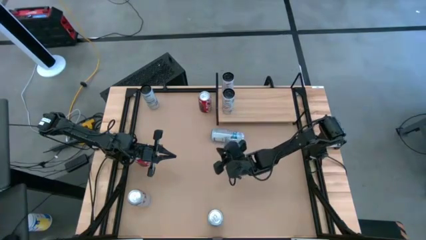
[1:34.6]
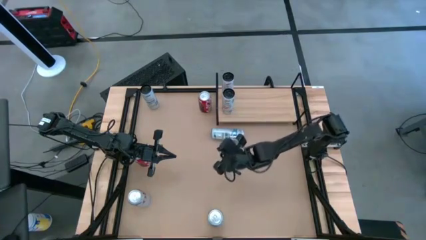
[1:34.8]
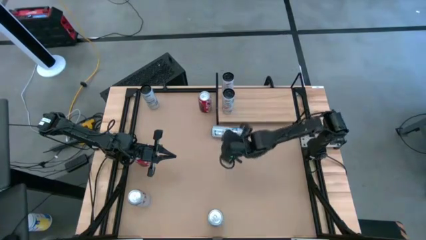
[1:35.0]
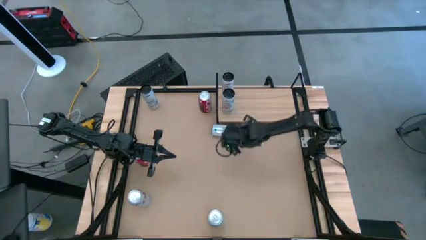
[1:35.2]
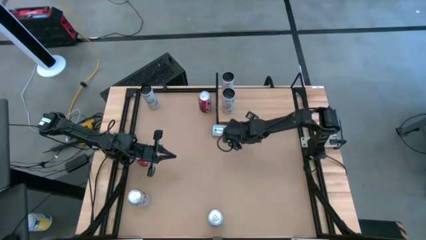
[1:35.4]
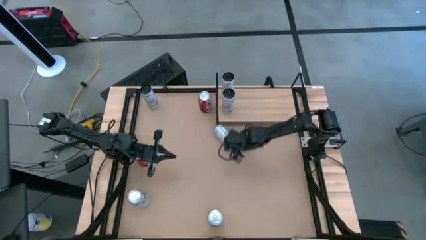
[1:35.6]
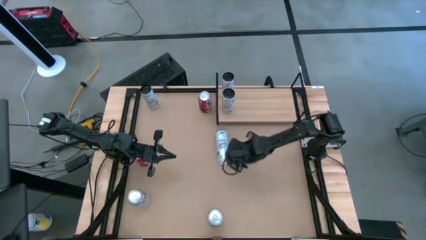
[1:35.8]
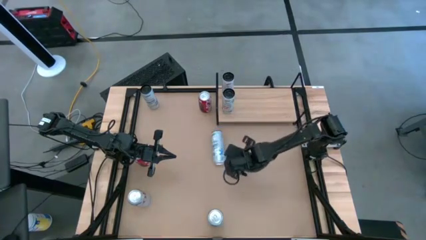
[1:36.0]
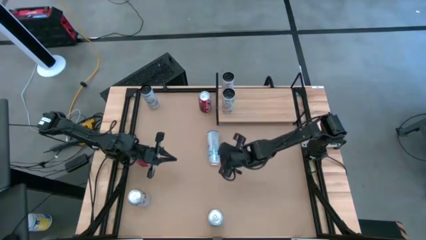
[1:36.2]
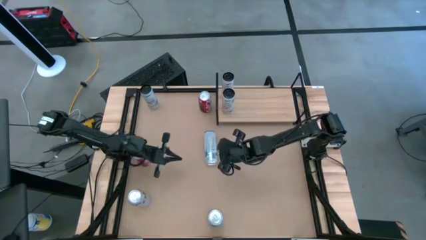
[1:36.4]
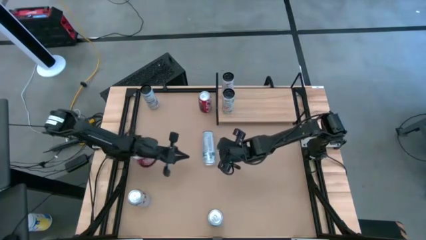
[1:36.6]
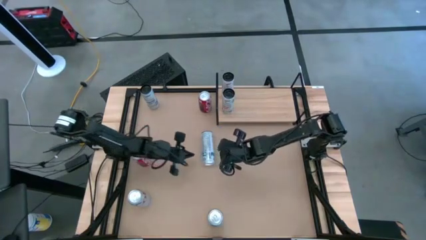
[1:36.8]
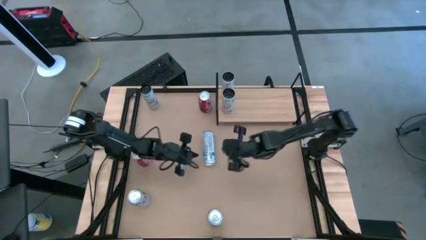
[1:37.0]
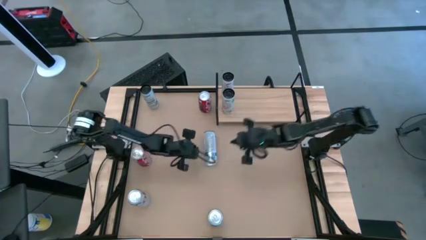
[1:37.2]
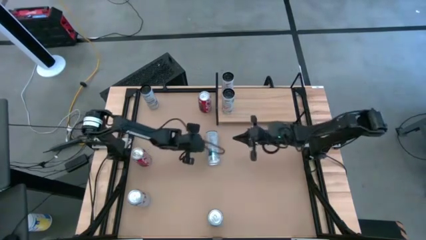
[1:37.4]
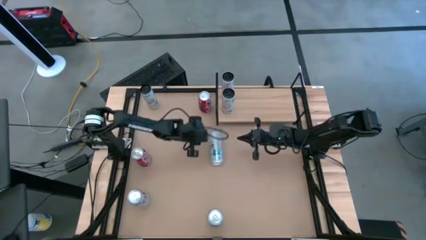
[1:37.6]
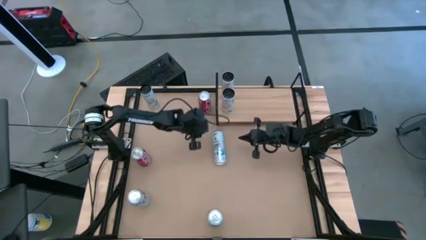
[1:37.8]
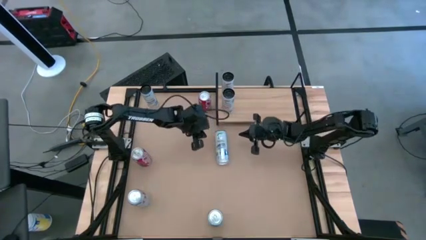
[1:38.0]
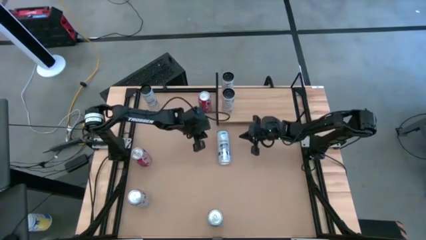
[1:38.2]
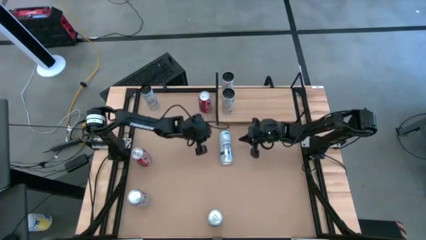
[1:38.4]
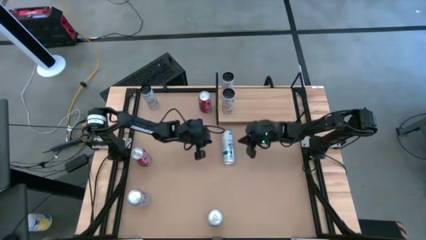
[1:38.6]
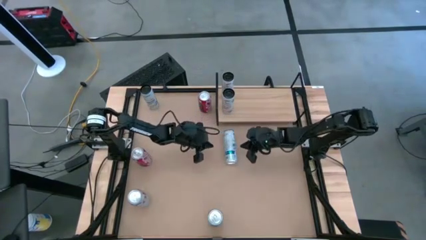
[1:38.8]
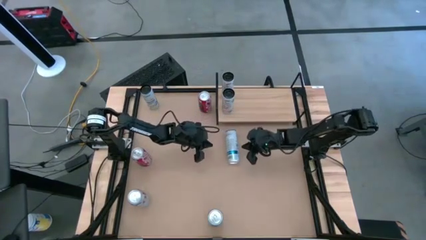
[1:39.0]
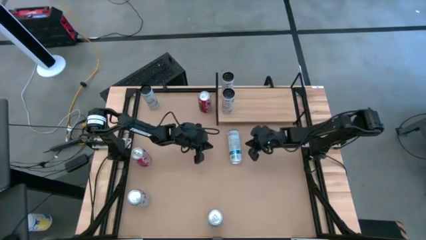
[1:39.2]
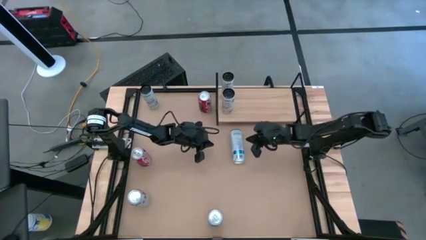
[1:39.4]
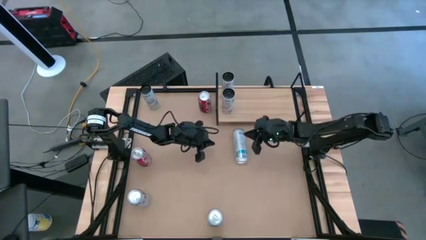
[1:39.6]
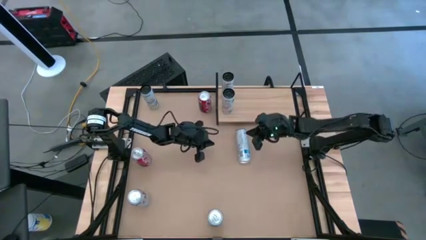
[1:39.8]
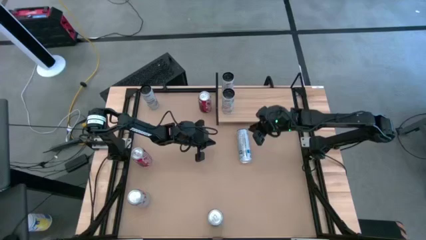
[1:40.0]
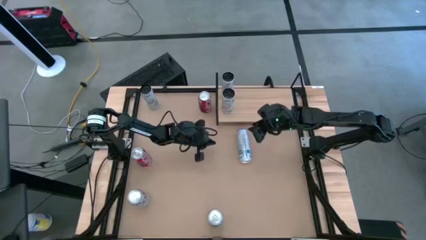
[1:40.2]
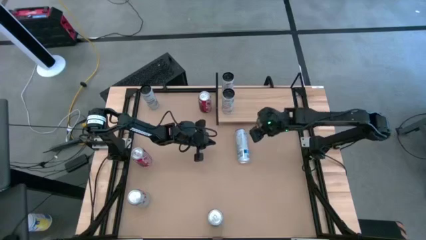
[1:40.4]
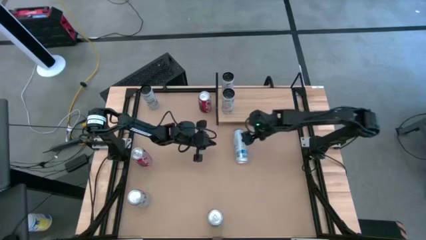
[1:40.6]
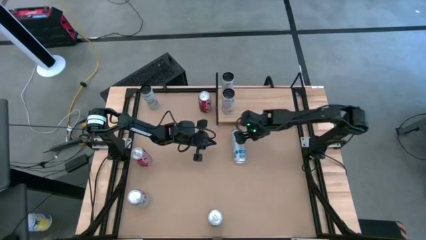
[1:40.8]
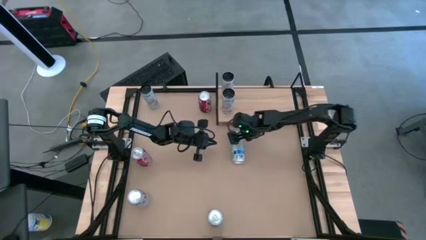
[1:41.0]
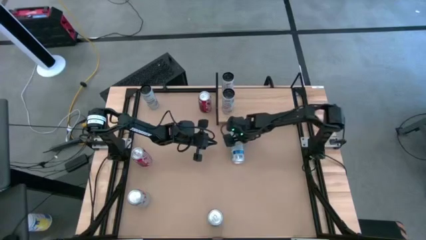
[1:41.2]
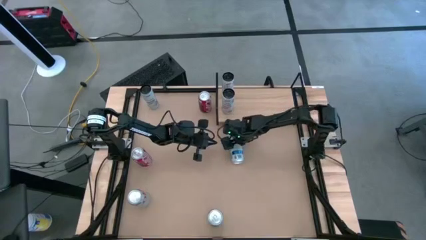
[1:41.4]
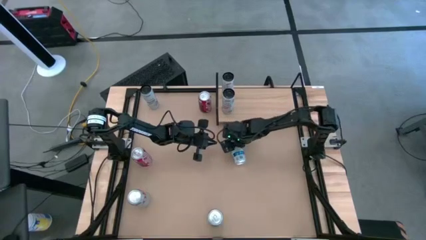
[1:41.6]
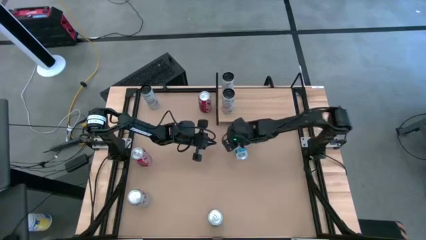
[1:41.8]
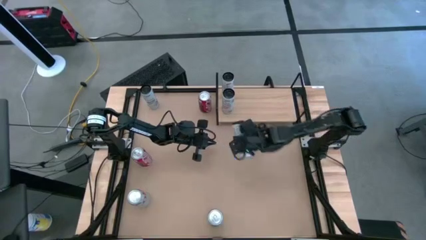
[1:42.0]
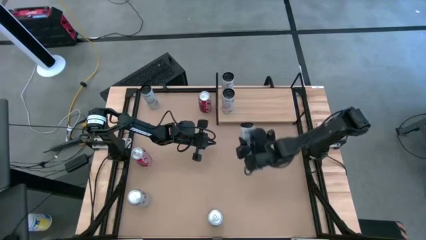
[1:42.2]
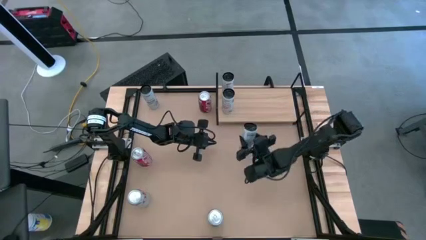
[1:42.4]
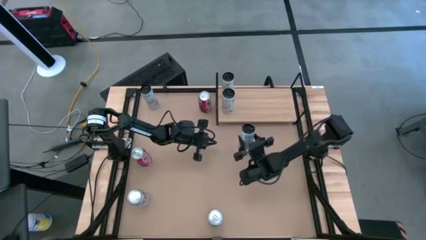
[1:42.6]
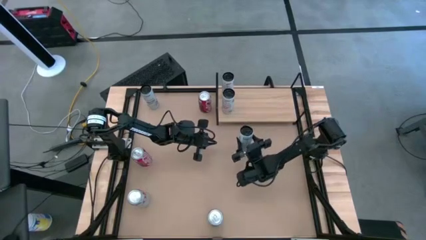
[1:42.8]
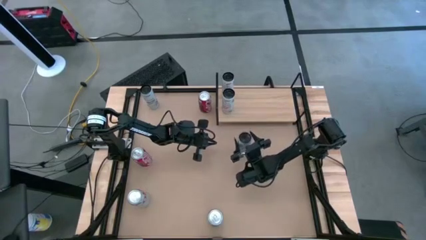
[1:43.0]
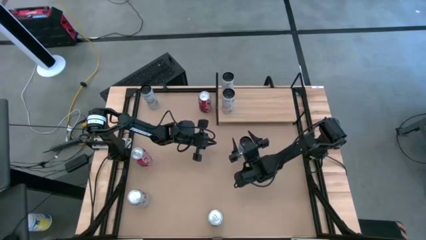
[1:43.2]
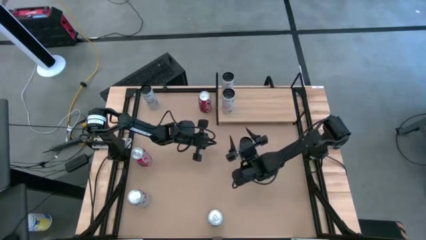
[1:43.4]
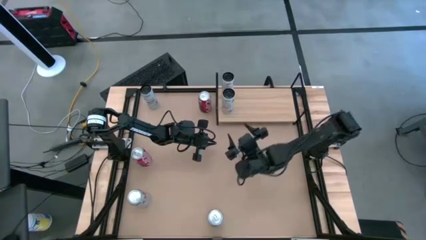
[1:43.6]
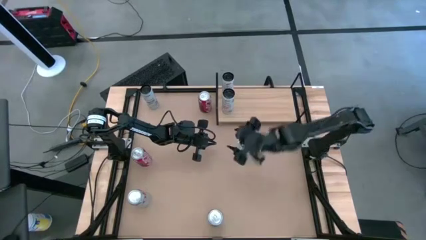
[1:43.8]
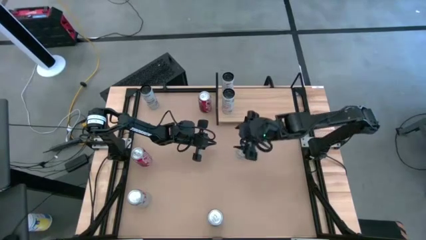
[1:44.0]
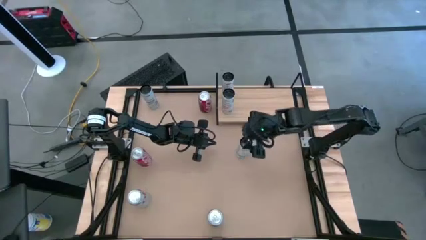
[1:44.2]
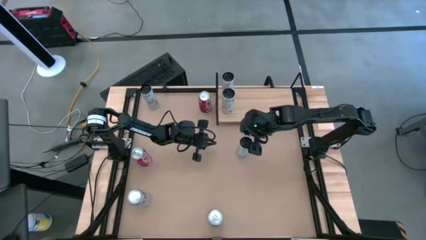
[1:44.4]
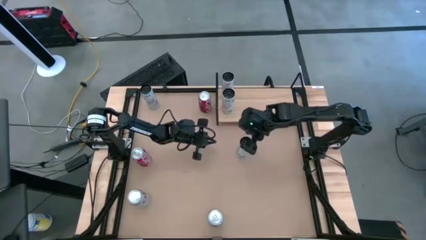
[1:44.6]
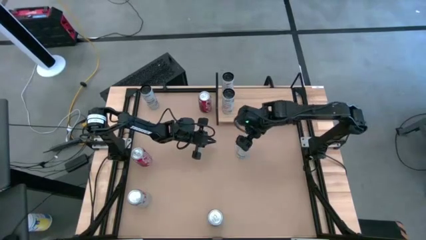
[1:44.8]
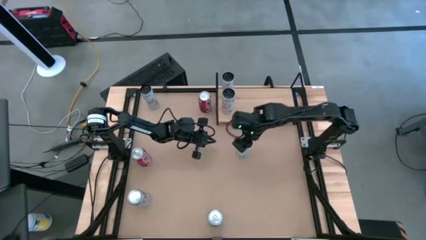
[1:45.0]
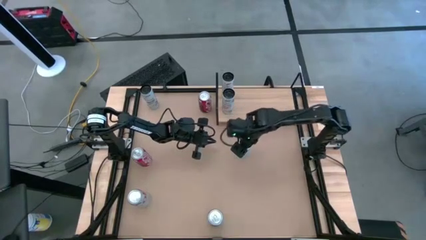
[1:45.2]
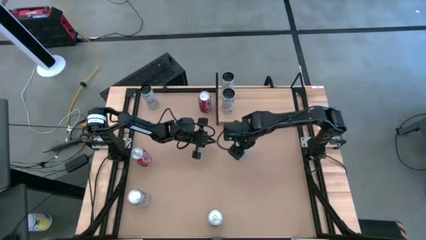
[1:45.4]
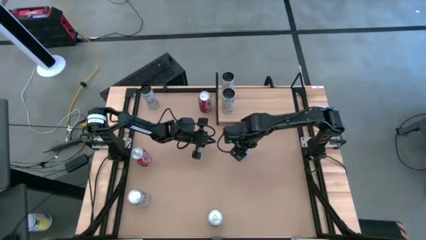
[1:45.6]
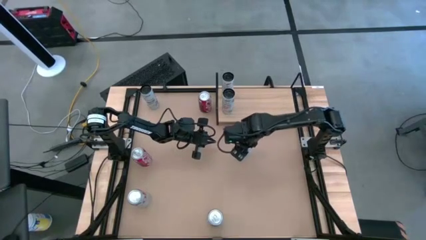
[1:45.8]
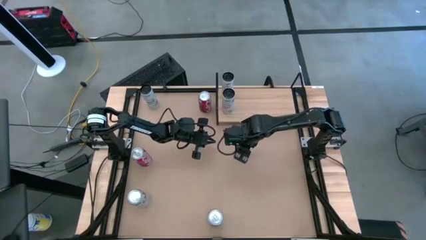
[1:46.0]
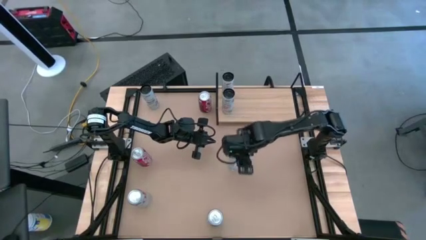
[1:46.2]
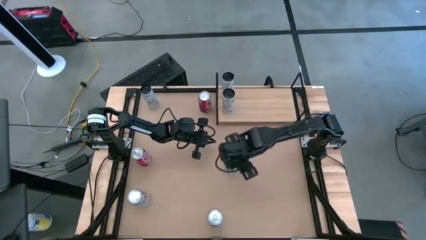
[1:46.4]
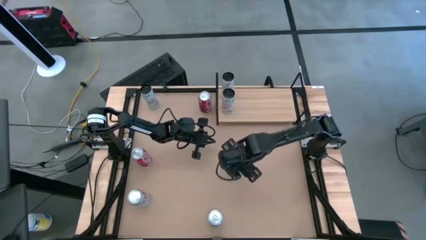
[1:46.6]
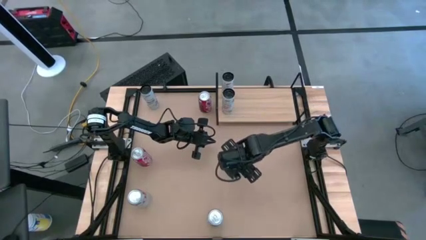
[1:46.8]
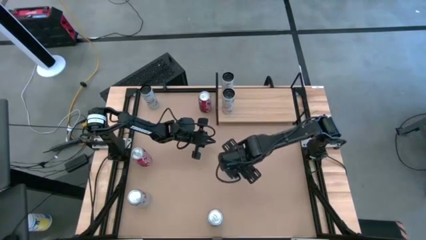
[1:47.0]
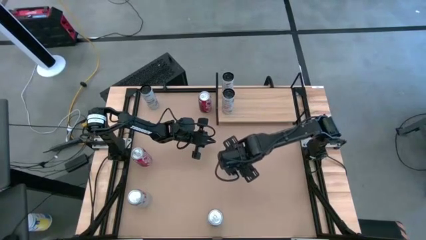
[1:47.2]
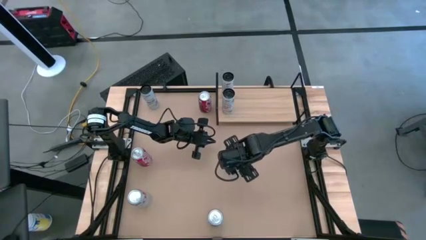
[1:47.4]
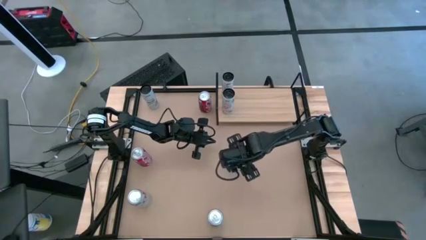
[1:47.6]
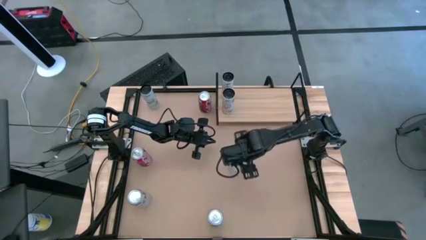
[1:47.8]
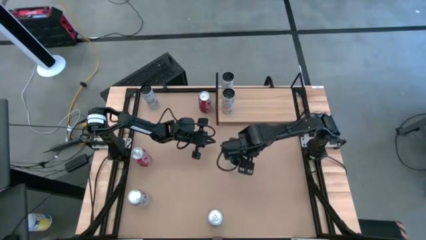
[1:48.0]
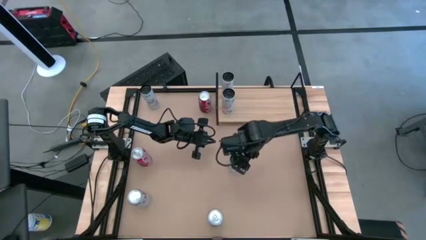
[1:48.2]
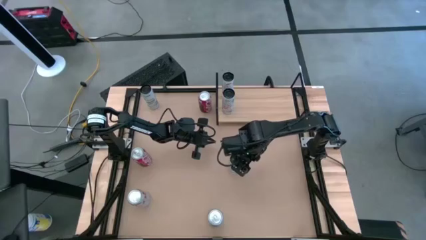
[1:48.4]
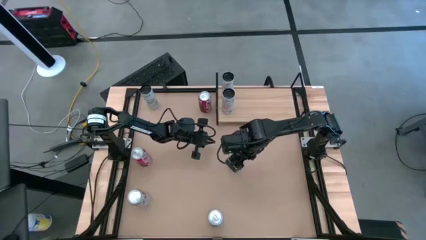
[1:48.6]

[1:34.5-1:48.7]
Task: Place canned beverage on shelf
Put the bottom white-blue soda can on the shelf

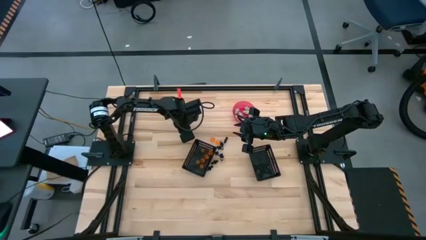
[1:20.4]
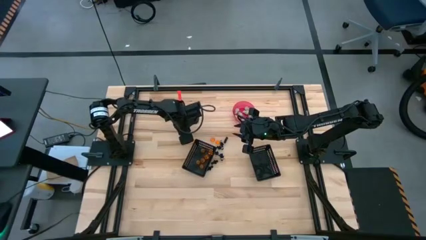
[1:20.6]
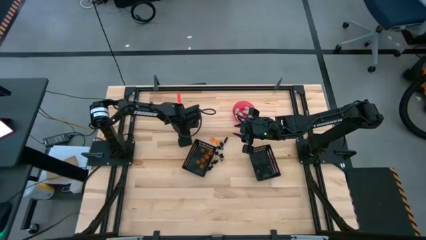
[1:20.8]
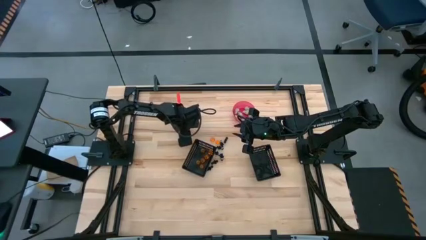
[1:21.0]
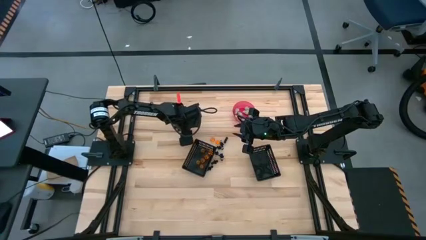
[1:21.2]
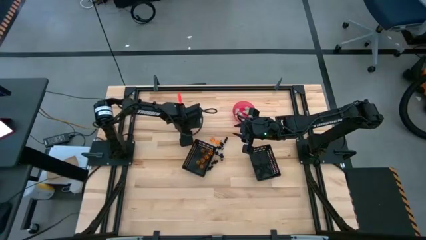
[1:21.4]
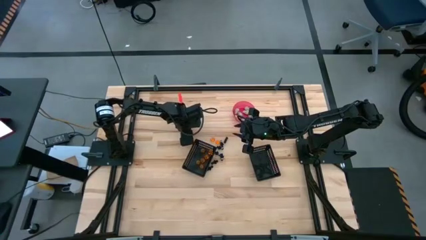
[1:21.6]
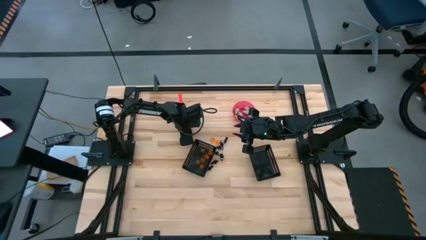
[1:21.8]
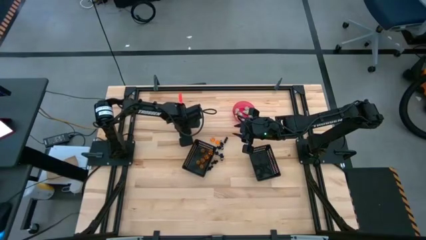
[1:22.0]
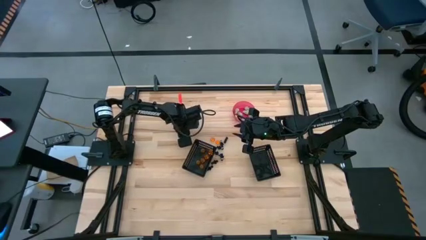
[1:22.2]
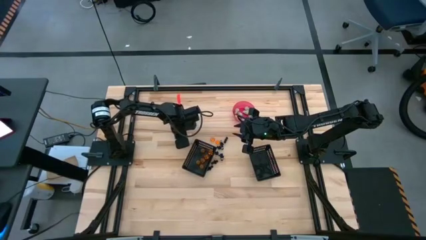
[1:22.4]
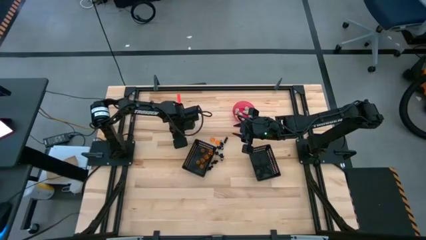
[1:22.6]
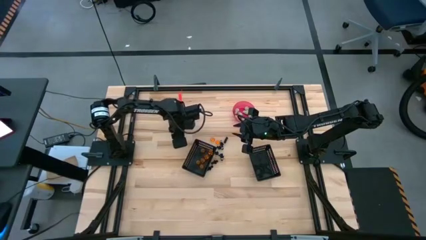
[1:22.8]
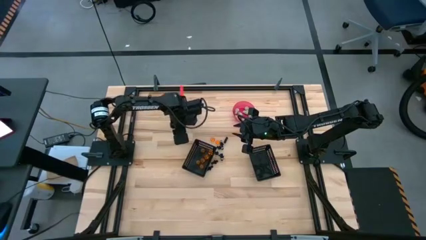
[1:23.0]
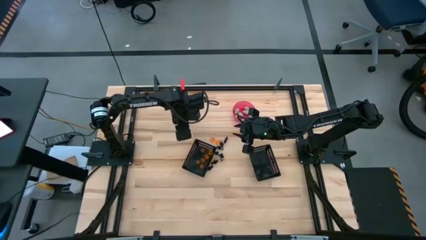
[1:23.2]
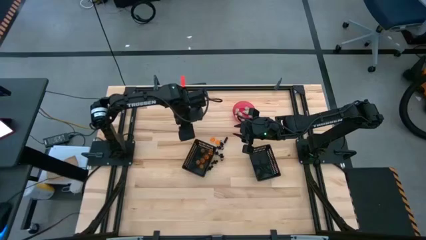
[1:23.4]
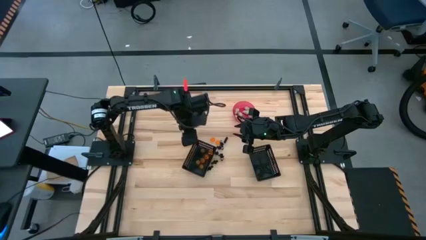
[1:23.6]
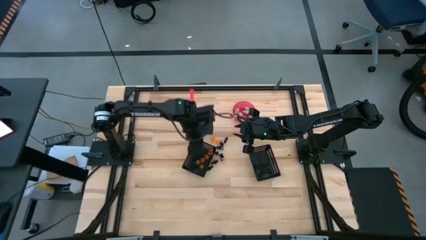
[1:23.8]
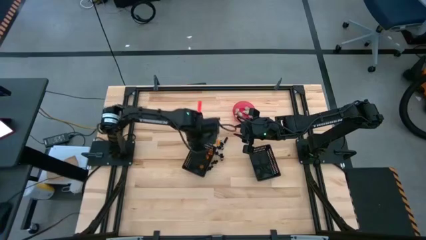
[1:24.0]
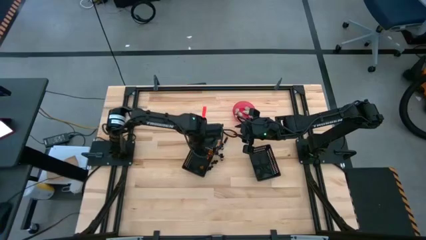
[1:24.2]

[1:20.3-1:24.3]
Task: Sort Halloween decoration
Put the orange pumpkin toy into the left black bin
